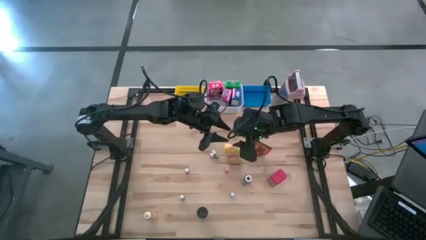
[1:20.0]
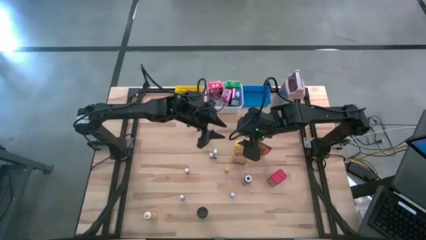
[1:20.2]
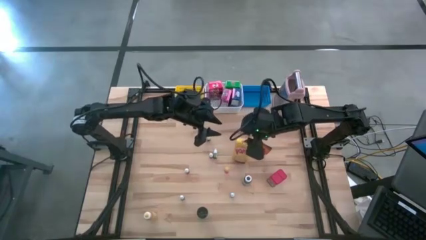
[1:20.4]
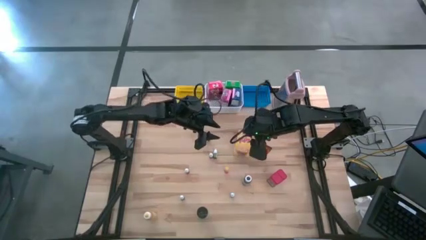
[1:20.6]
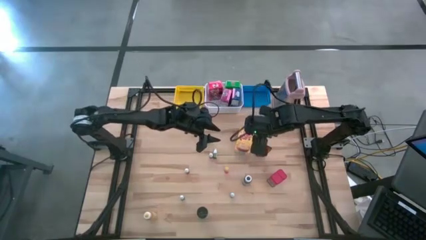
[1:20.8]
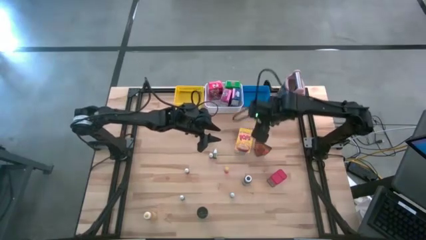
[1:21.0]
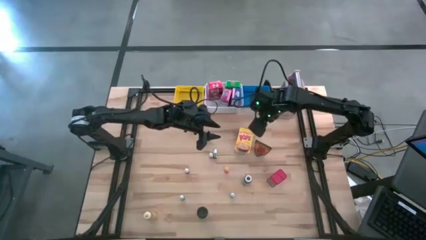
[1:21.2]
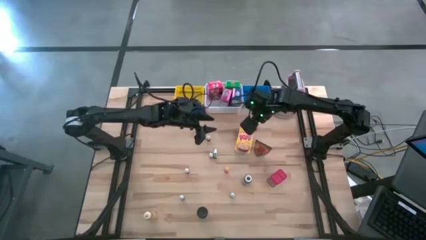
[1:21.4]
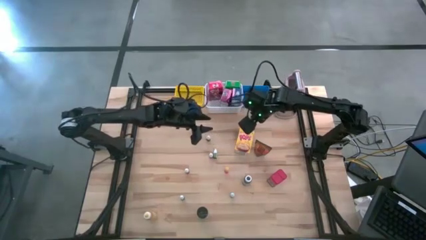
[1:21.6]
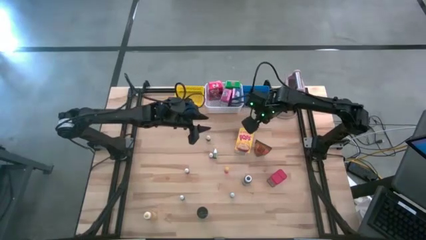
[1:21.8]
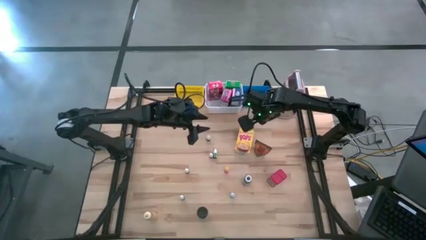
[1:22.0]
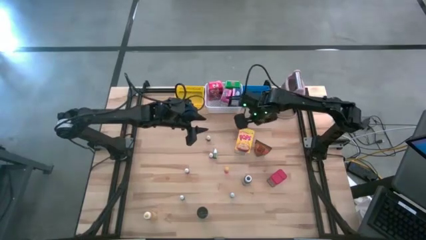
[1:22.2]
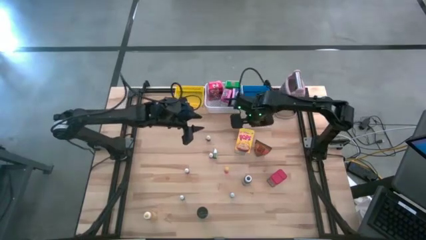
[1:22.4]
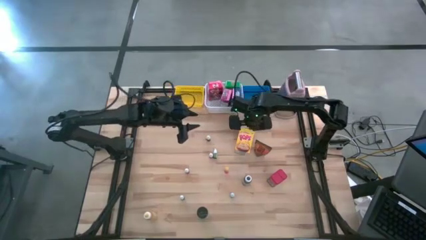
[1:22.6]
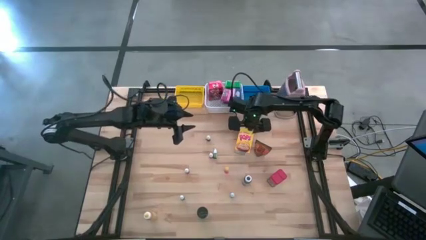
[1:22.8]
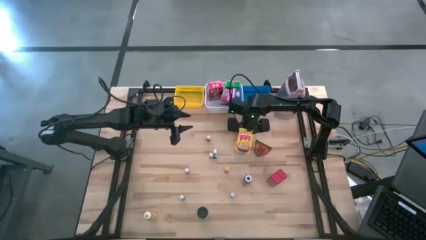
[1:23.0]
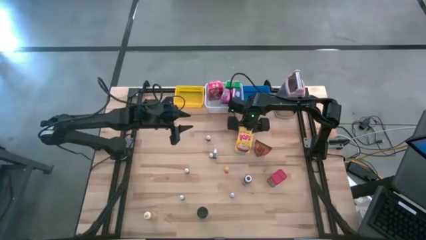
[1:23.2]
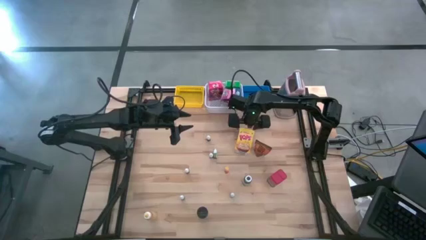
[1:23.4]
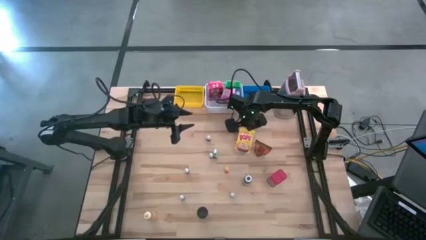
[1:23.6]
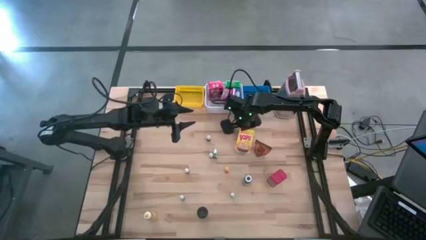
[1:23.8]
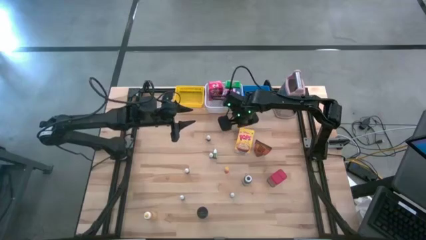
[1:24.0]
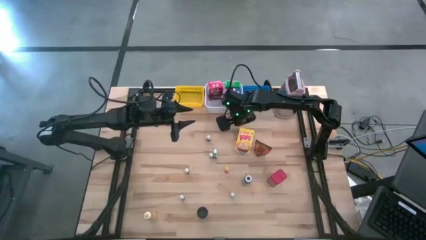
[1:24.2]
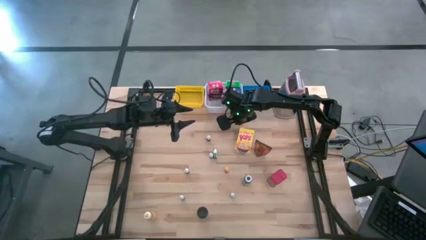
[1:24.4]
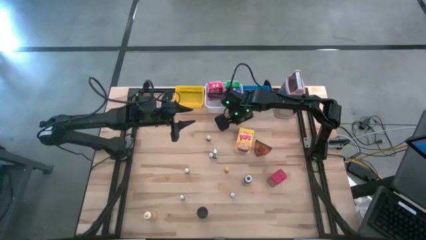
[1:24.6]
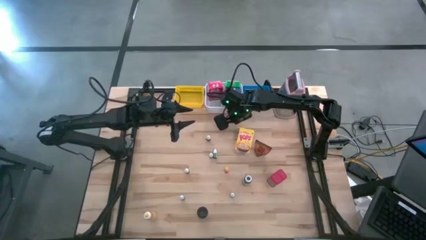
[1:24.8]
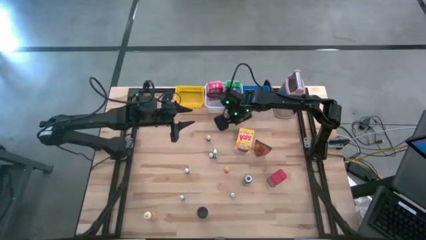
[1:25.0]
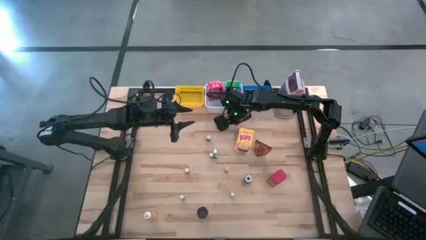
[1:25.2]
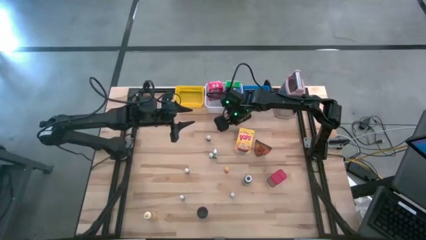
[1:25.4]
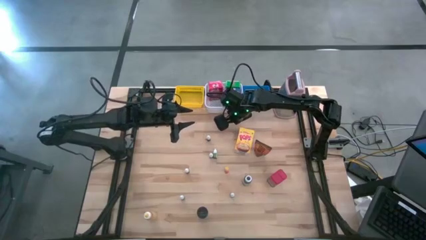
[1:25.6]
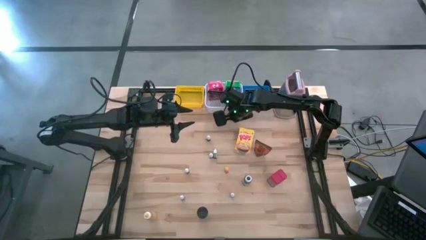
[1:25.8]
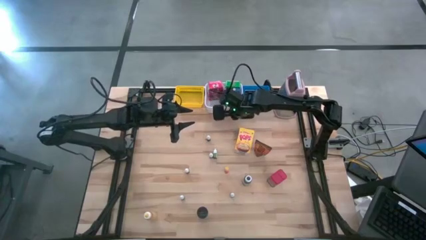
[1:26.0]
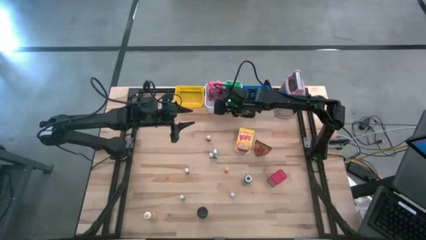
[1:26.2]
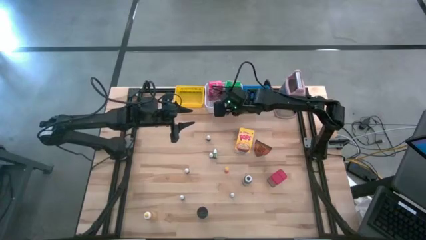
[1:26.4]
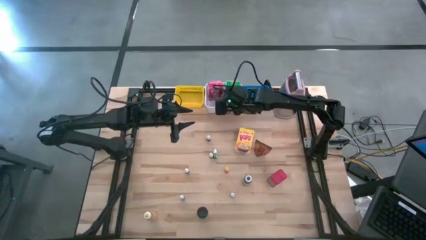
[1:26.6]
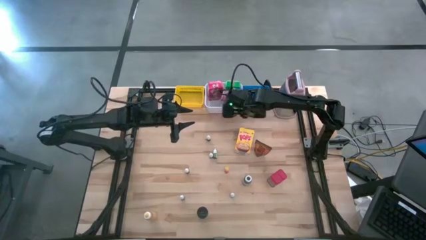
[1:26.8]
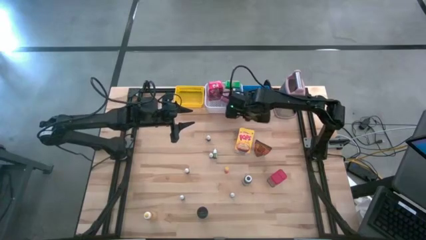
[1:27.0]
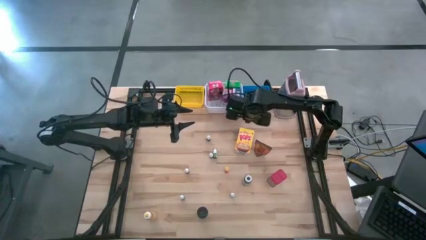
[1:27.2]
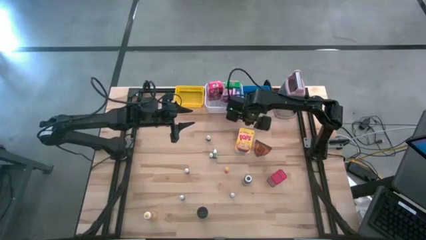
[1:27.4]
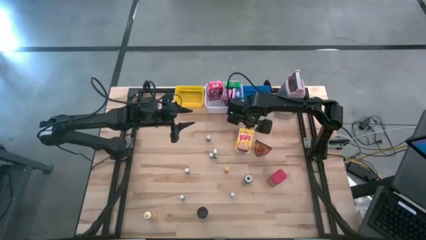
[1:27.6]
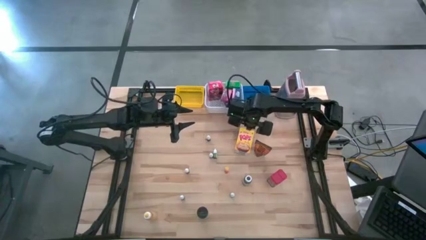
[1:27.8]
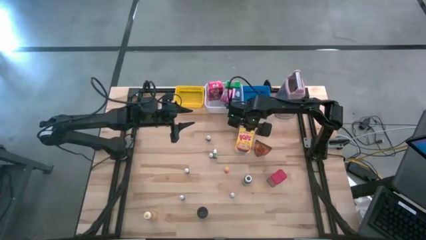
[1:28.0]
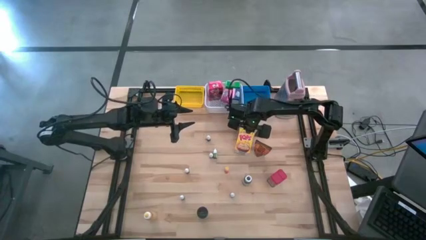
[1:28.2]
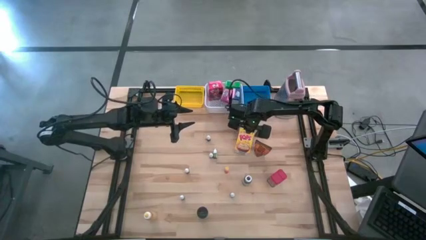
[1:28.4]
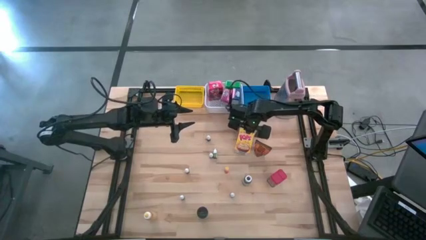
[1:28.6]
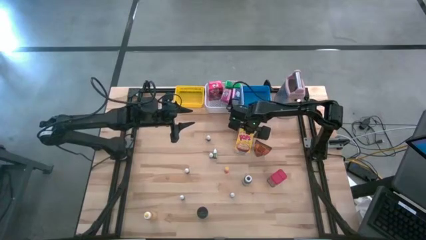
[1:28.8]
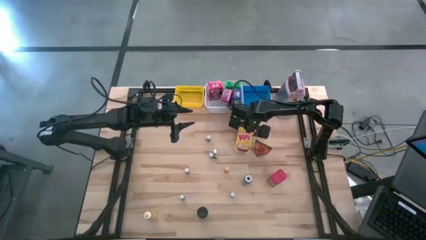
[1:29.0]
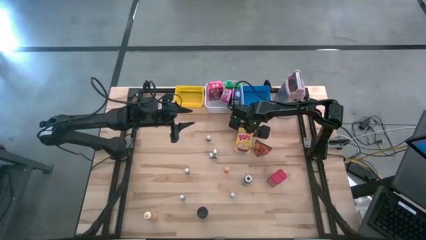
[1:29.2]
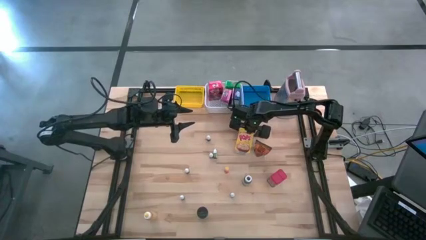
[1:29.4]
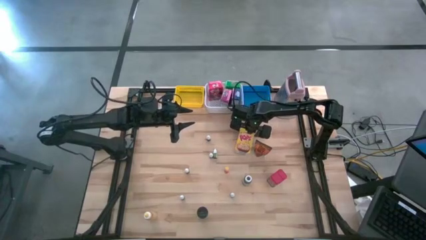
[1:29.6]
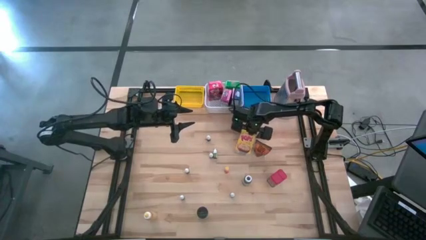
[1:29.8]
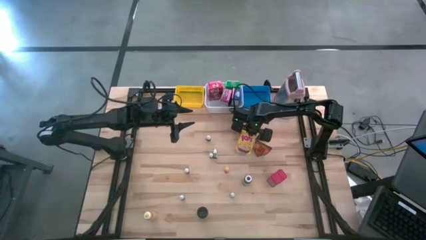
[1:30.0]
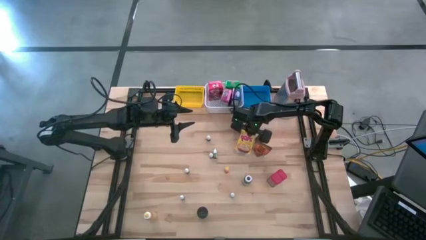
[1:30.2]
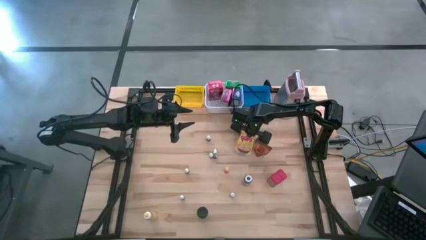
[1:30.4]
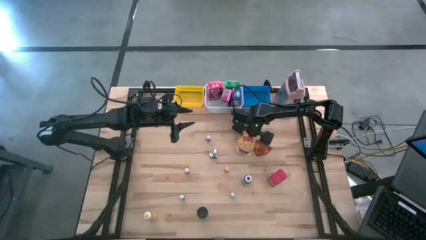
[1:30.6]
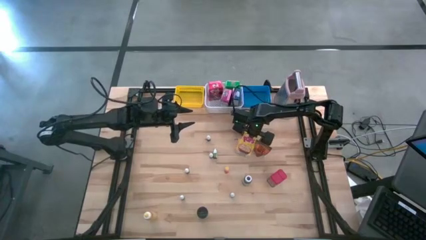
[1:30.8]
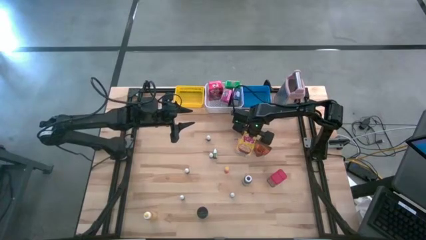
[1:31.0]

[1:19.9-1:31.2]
Task: Pick & Place Kitchen Items
Put the yellow cereal box into the white basket

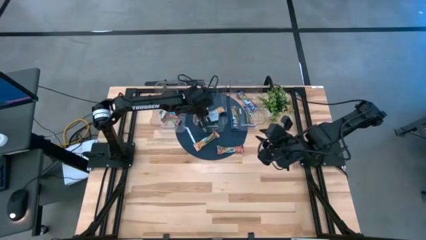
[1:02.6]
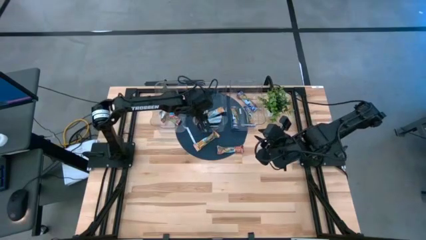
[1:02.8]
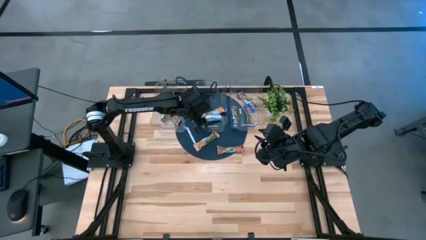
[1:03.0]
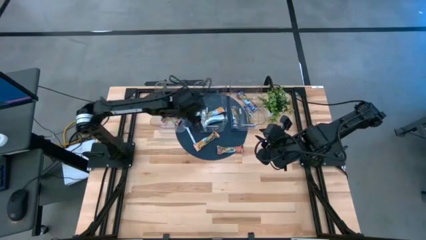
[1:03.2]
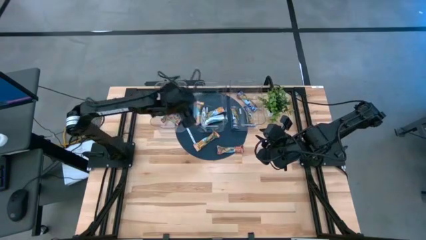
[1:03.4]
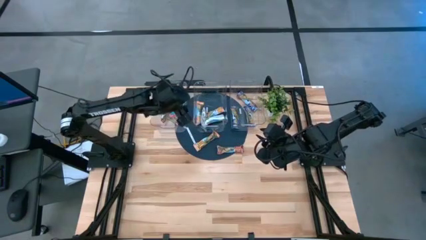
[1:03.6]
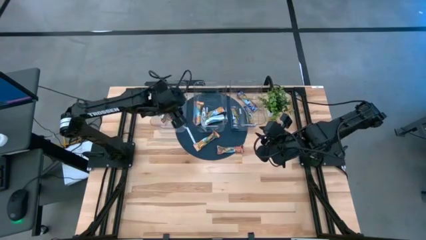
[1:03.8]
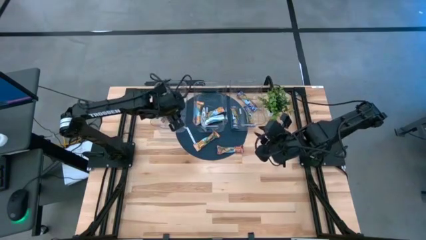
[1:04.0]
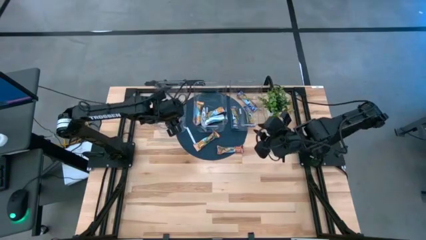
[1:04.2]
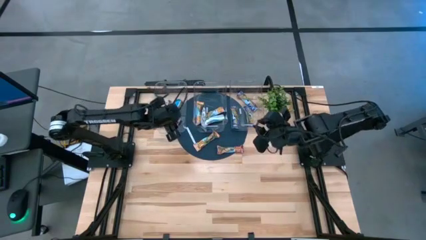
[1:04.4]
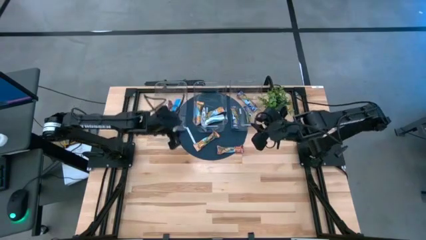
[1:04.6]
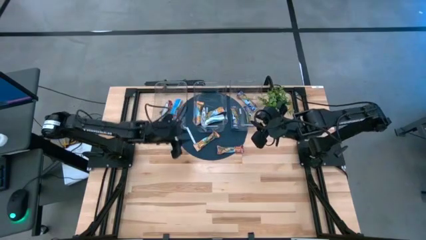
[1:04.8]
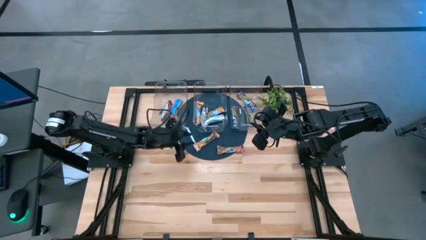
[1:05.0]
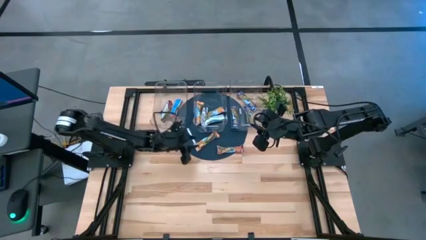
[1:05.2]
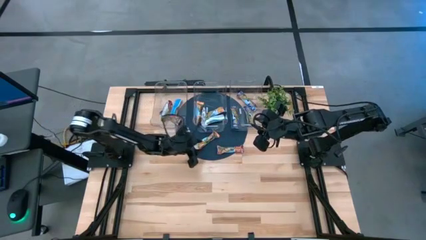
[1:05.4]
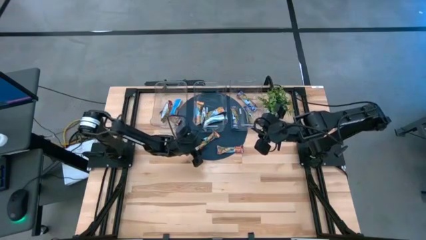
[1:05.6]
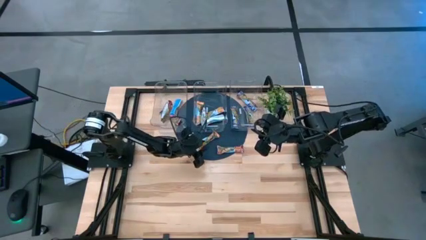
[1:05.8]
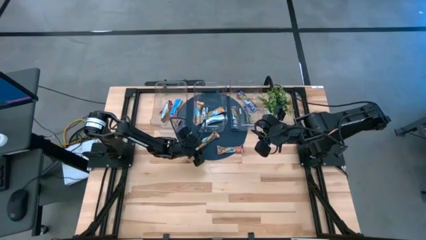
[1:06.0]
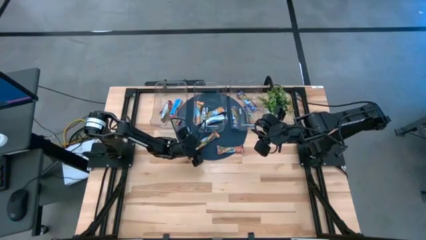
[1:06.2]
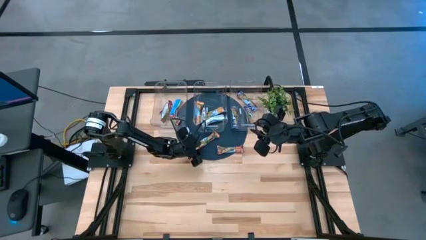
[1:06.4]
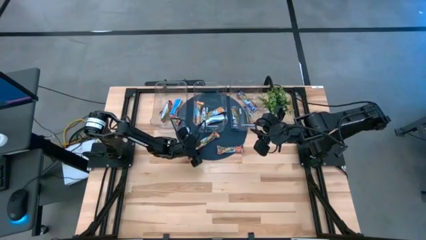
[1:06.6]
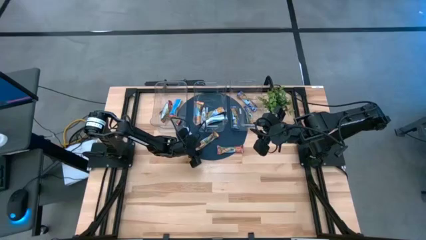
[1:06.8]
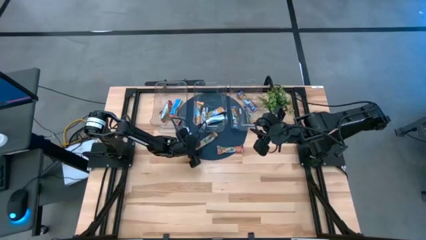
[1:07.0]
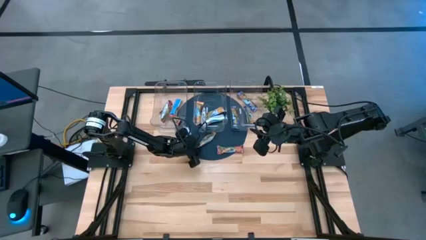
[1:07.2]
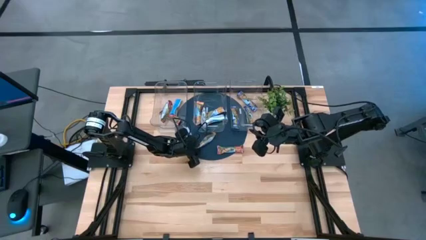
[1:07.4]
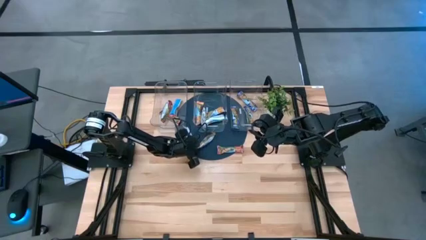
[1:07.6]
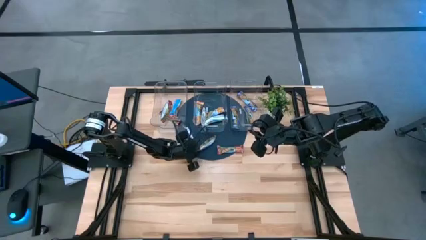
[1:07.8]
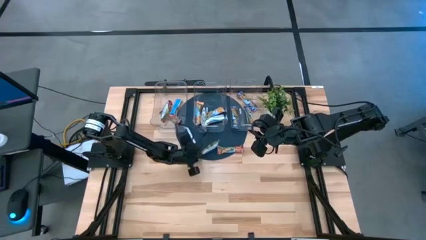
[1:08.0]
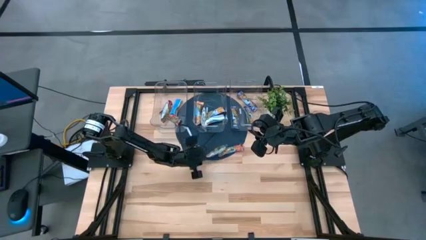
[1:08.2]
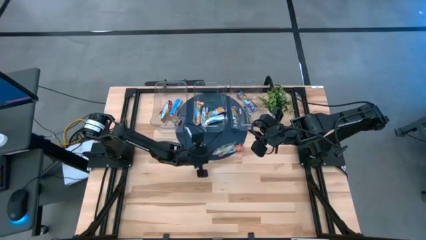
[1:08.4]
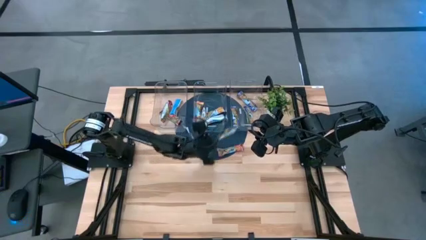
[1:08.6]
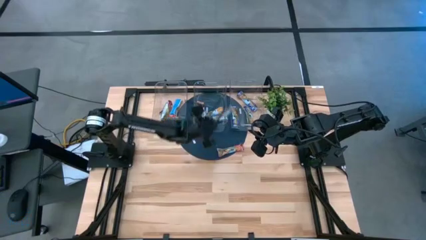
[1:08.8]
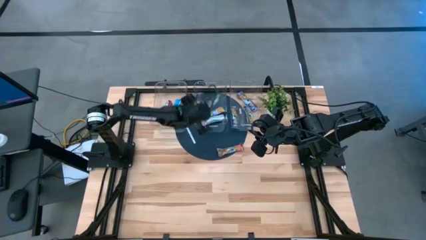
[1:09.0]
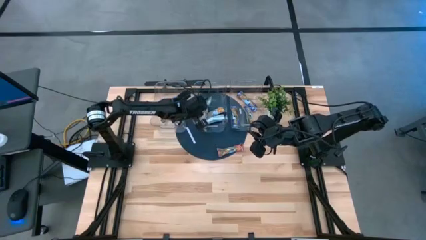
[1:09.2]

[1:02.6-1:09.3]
Task: Pick and place Granola Bars by type
Put the yellow granola bar into the middle transparent bin
